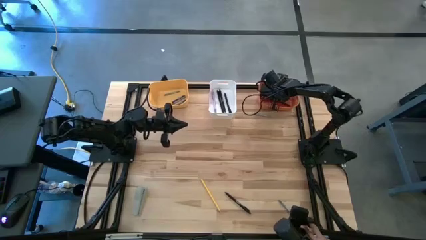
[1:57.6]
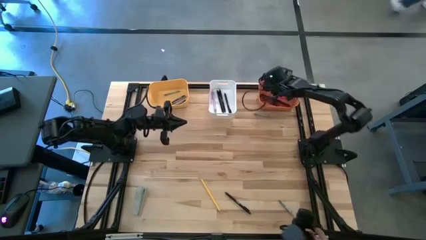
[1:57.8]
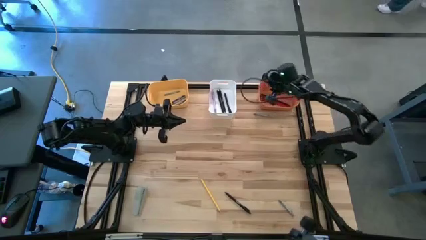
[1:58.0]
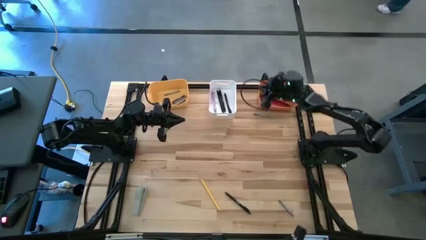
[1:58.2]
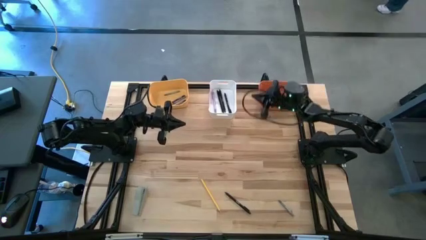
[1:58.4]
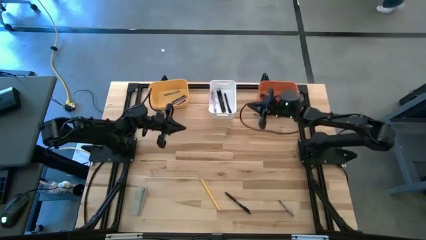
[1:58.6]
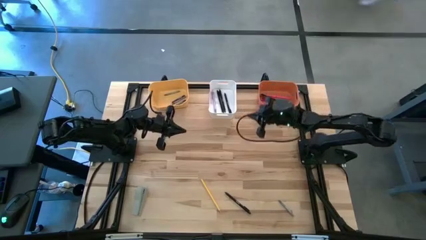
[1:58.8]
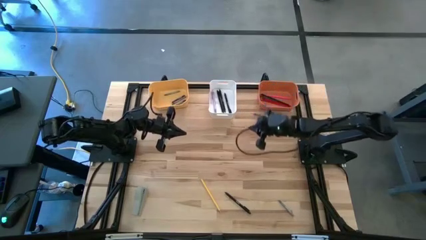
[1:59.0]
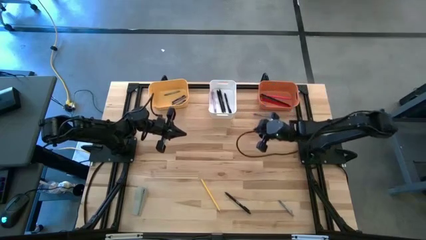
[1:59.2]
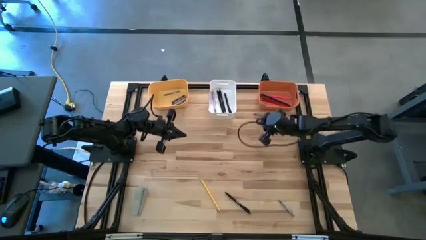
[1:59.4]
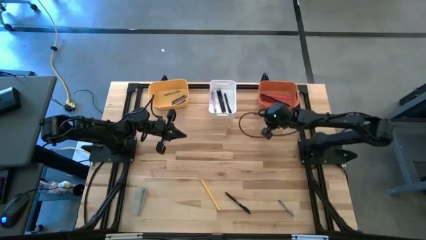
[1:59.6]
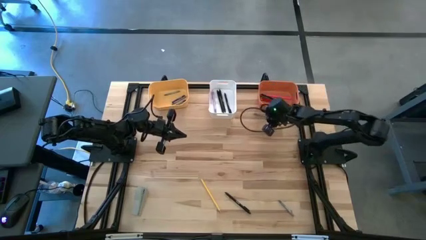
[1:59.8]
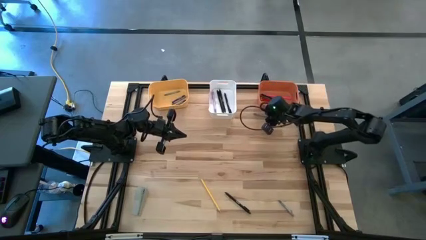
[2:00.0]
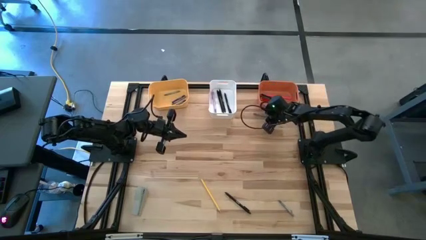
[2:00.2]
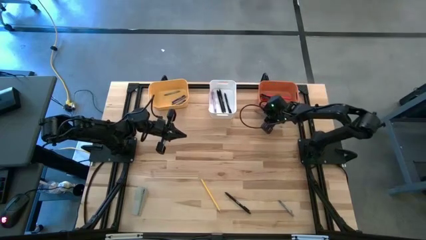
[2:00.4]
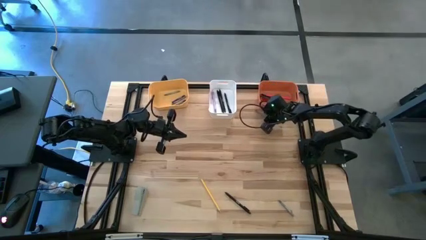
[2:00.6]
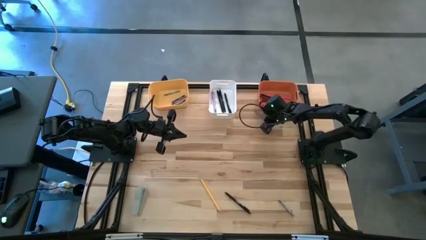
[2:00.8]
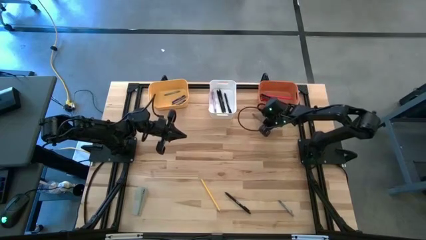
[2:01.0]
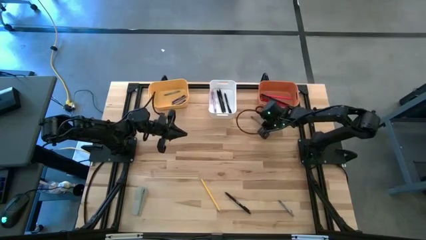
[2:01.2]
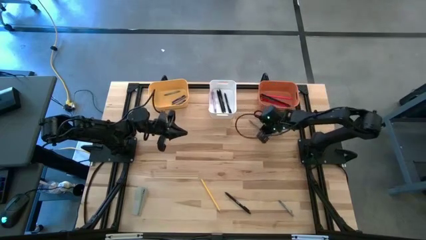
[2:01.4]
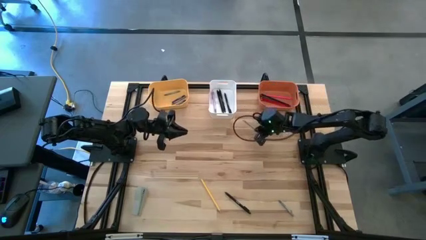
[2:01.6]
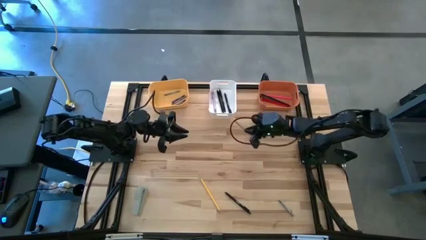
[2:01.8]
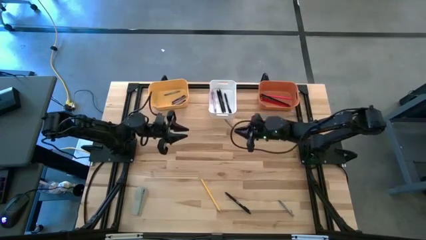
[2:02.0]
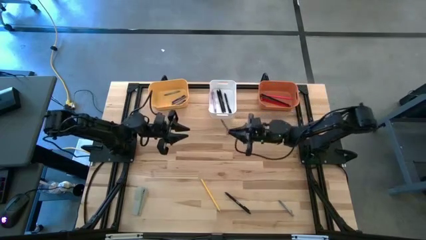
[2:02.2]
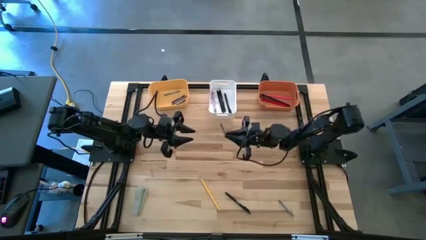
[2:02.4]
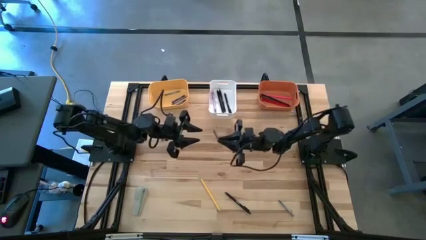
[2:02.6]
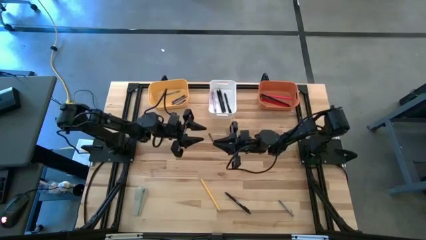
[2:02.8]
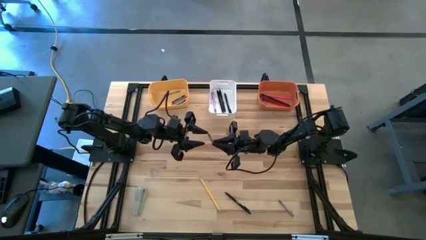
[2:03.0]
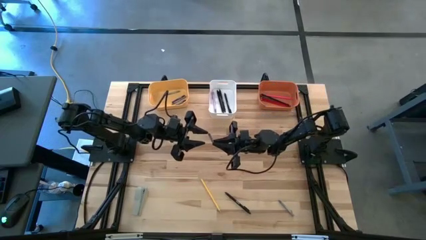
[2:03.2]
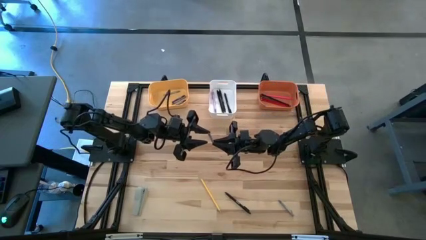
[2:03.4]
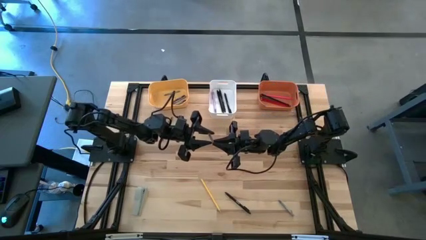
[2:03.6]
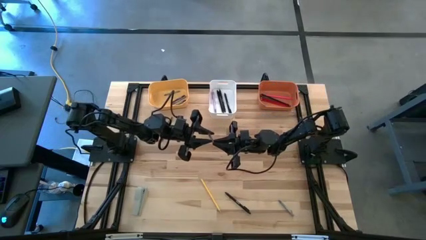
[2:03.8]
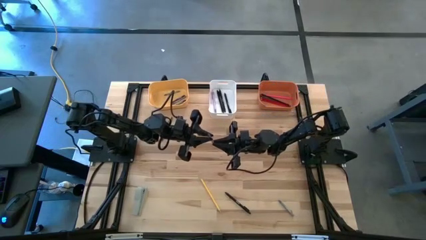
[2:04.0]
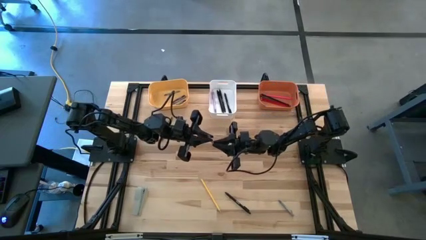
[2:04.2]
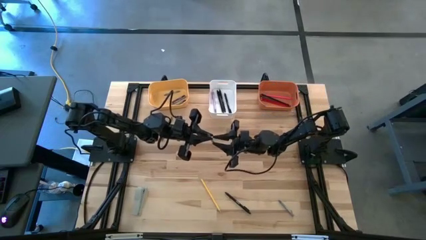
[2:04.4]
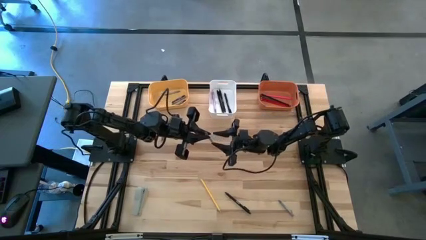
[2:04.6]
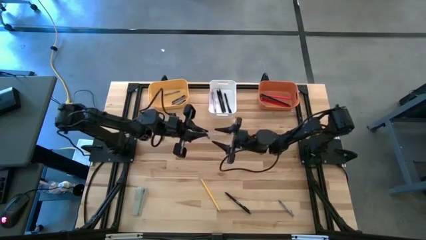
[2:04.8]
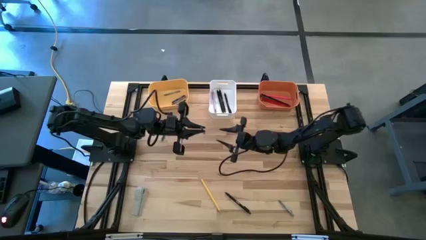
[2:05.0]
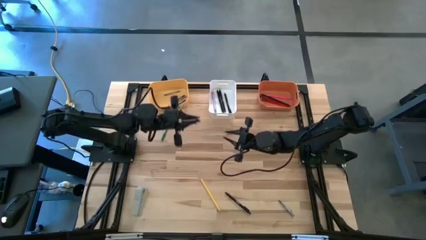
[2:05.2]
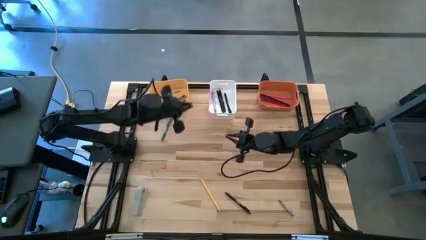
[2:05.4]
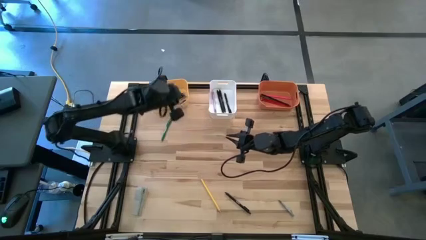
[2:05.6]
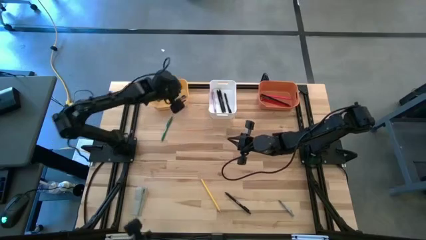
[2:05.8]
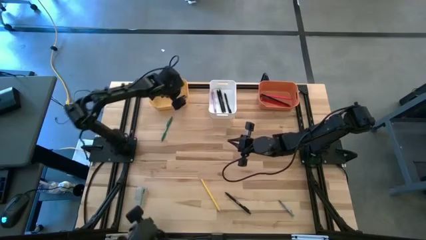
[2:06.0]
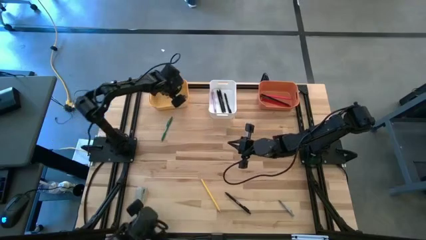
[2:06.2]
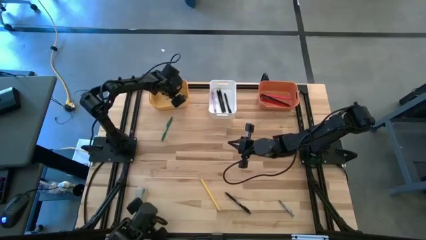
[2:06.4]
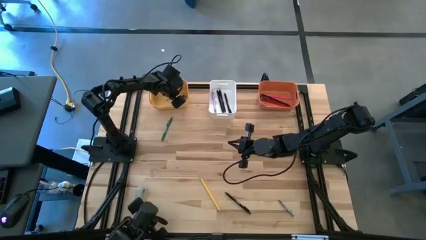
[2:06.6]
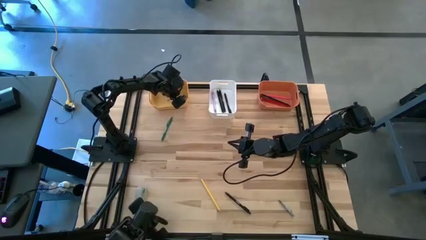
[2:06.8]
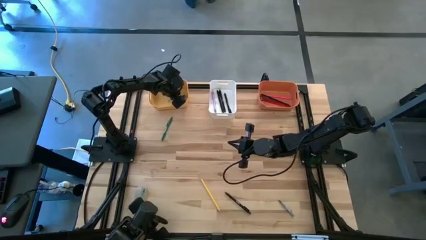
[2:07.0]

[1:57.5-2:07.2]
Task: Sort crayons/erasers/pens/pencils in bins
Put the gray crayon into the yellow bin

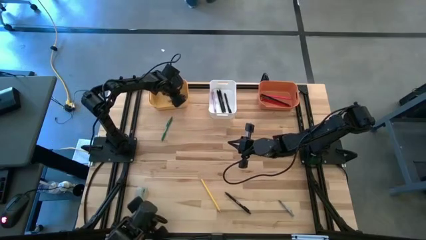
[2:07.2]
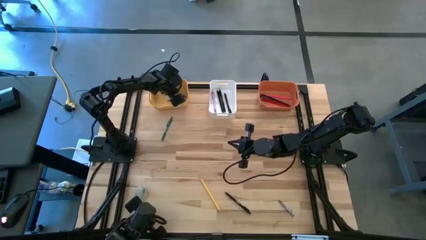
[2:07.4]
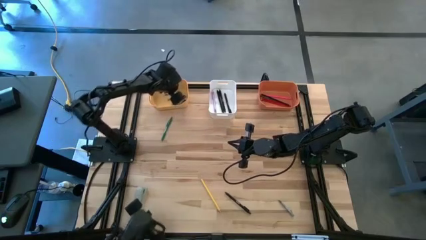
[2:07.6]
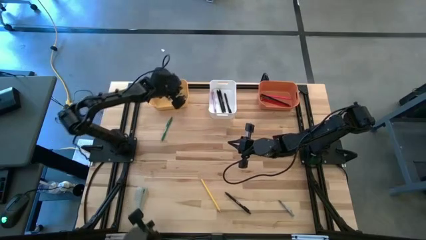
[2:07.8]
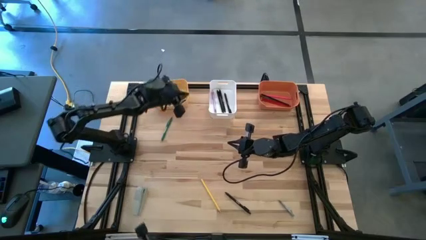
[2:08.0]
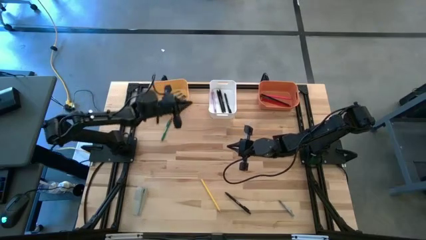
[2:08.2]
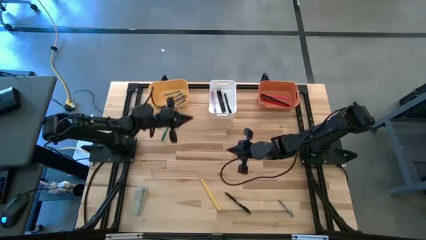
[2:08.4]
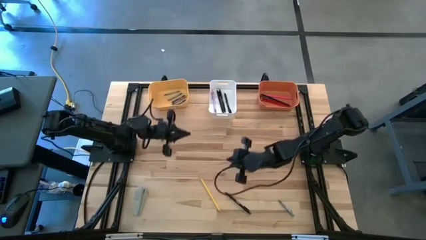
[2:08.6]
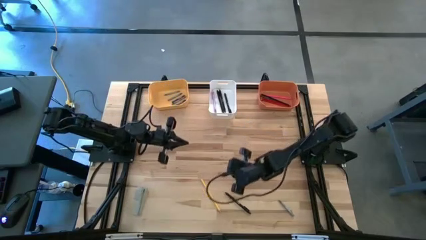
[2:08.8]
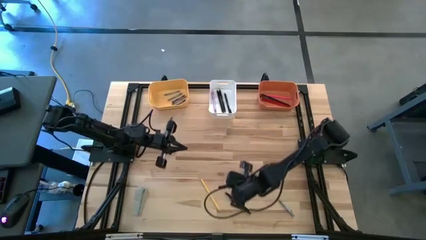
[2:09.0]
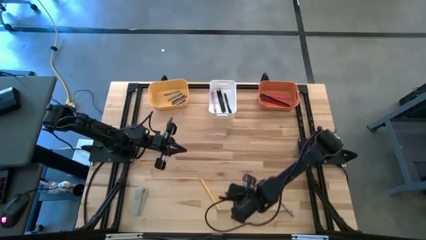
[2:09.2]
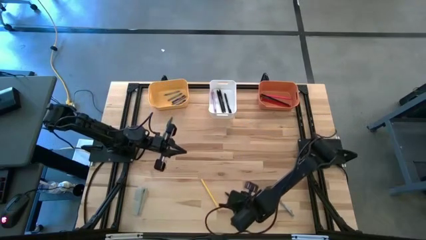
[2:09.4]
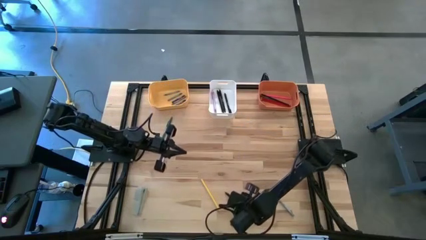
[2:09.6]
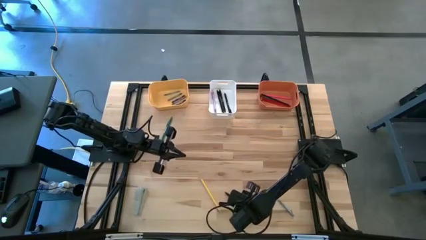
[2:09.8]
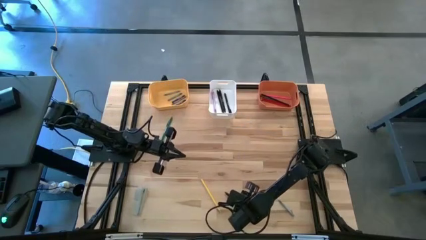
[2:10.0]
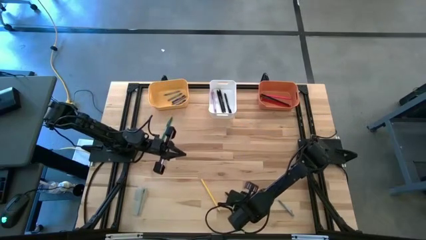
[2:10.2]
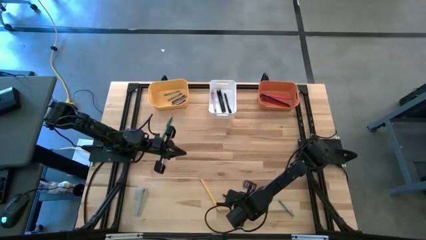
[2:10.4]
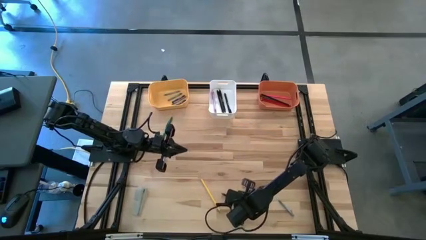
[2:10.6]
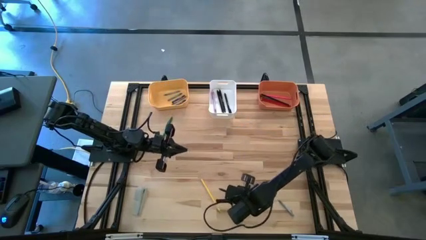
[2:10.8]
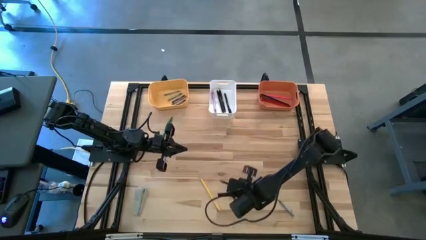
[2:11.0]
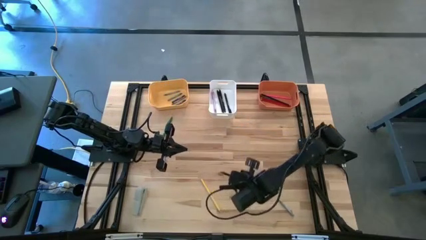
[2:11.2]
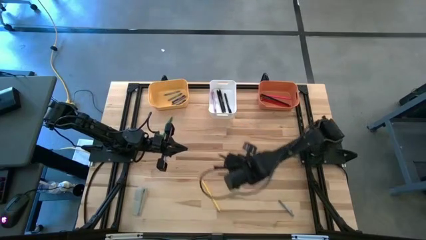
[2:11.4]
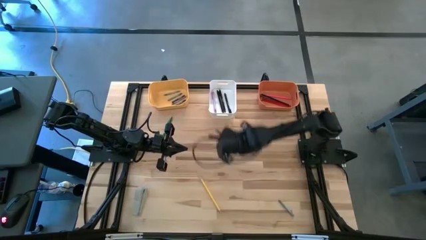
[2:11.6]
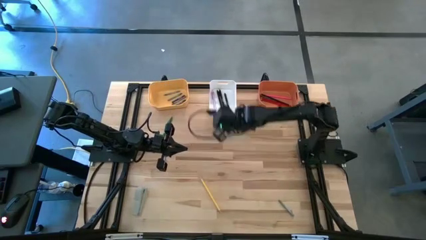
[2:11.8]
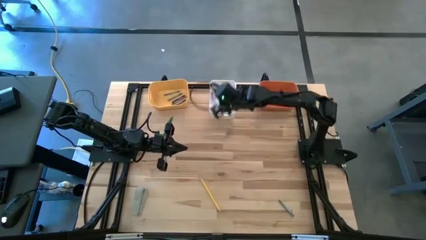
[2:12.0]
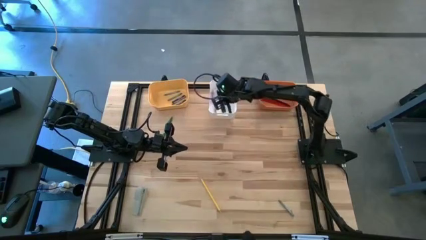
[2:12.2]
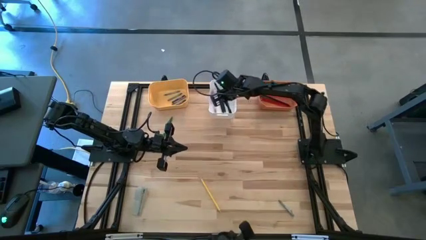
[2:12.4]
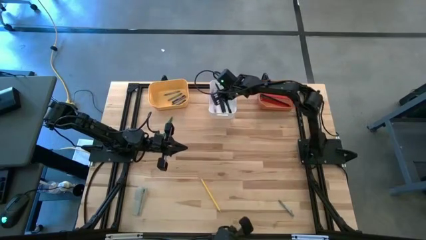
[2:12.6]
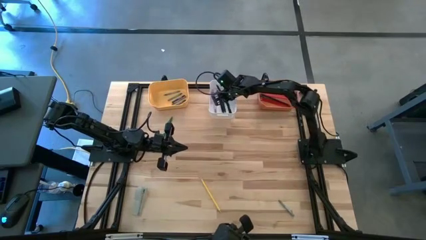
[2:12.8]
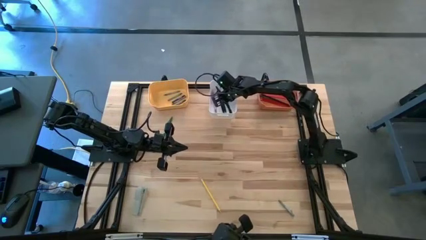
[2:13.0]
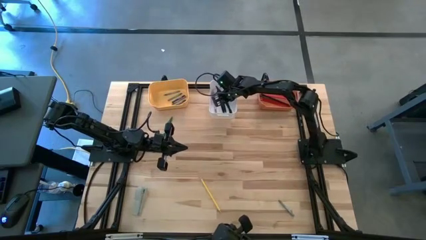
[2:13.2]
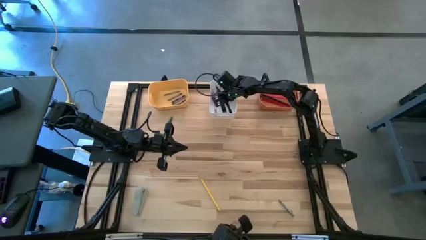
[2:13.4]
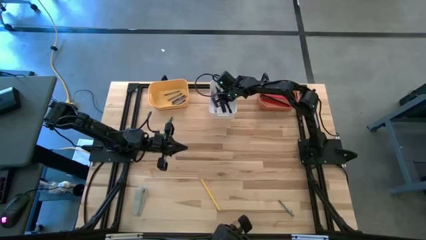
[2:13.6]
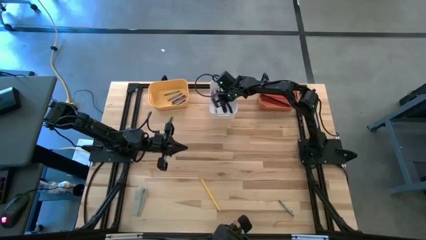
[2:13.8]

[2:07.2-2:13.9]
Put the black pen into the white bin
